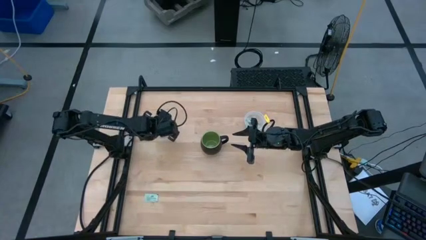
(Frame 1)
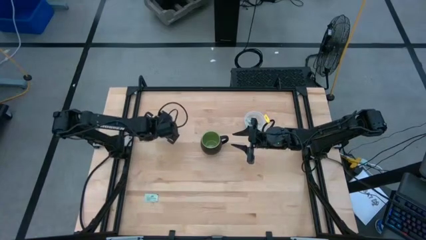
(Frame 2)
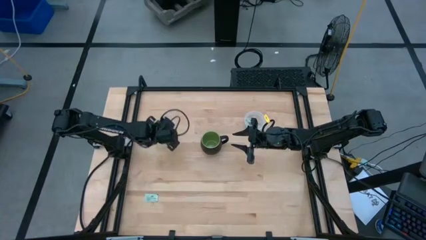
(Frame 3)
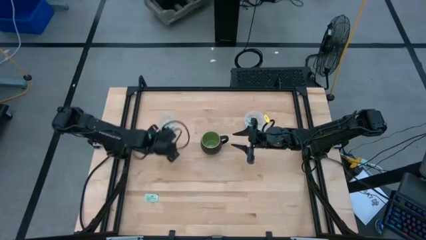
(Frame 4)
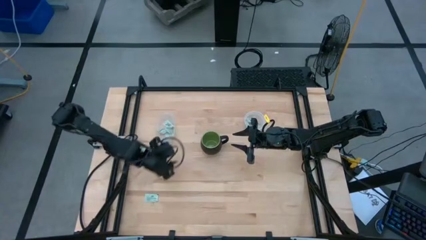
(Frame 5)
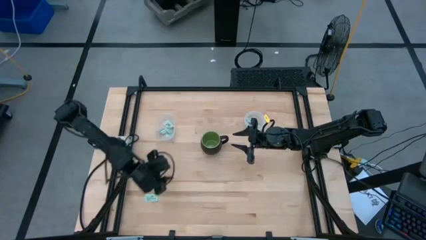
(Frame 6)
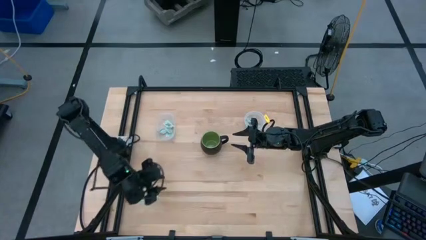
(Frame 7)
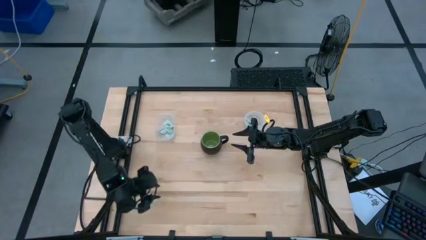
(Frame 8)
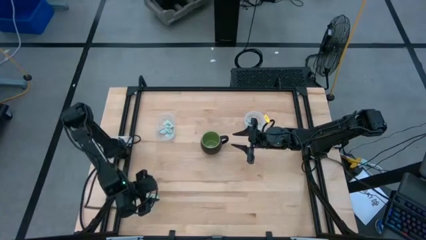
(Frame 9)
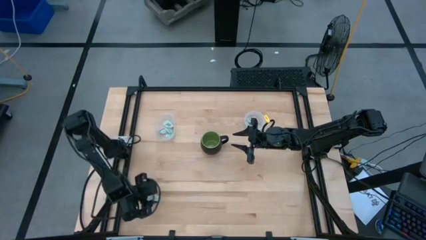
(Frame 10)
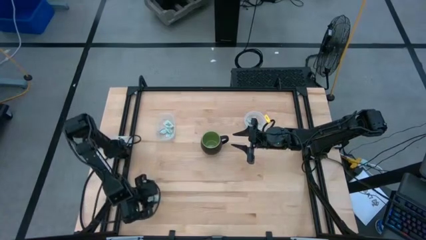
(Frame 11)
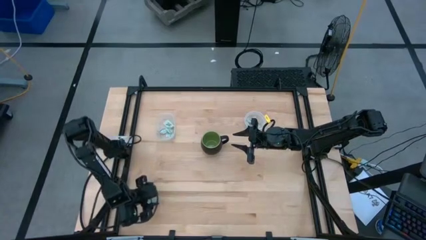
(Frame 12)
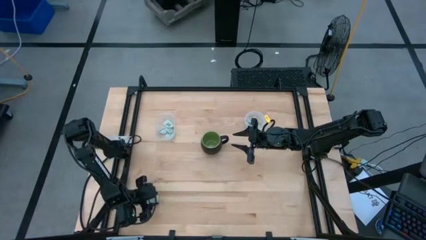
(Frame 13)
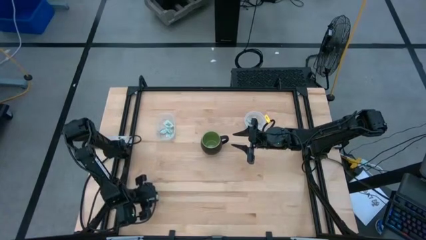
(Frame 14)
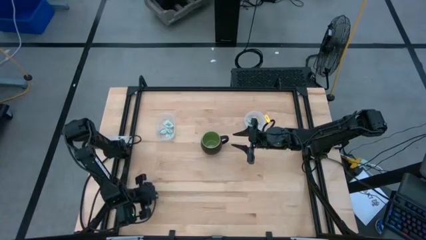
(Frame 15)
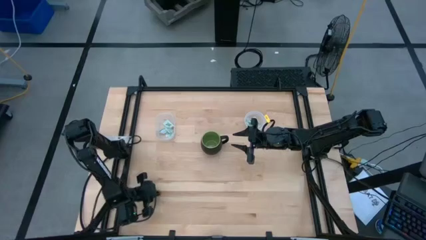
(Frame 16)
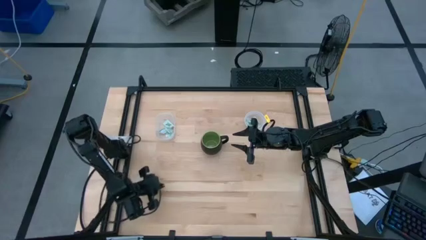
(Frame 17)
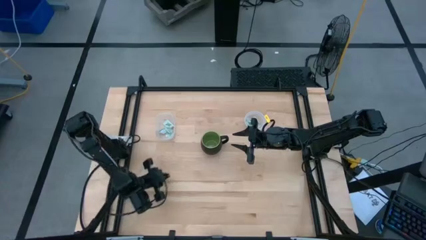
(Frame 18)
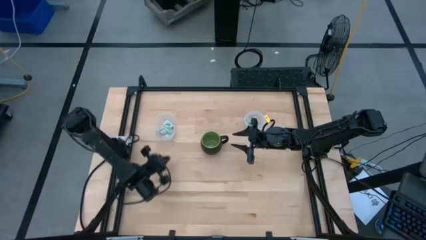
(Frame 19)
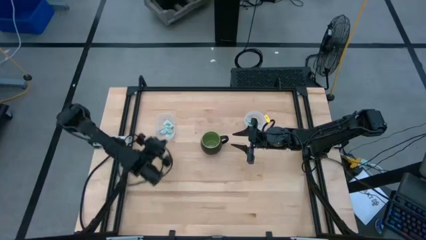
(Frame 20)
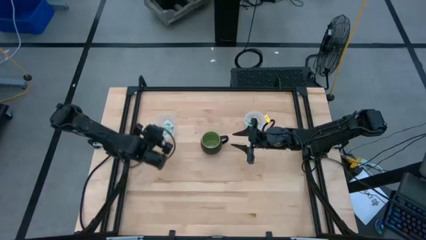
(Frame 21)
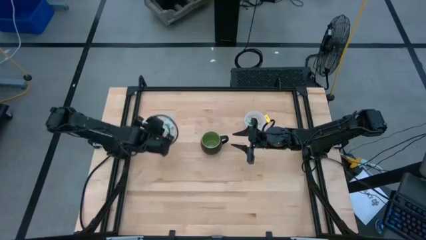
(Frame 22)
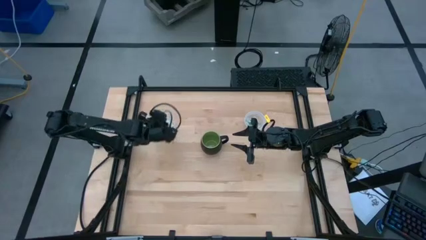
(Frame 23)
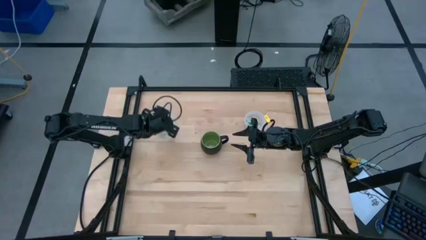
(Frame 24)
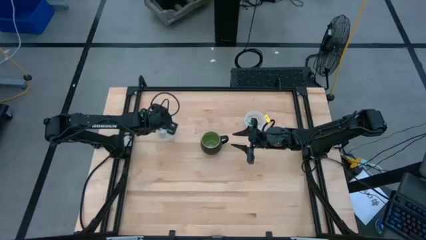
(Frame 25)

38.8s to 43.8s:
Task: Pick and place items into bin
Put the green stevia packet into the left transparent bin

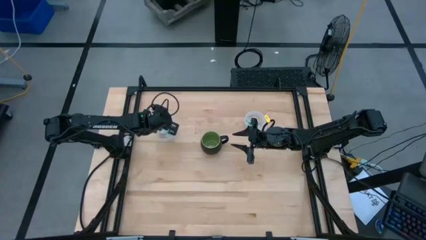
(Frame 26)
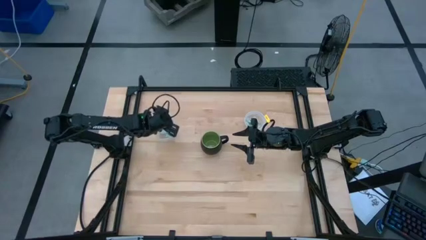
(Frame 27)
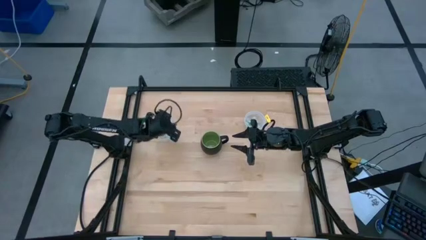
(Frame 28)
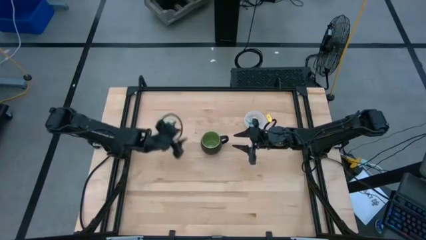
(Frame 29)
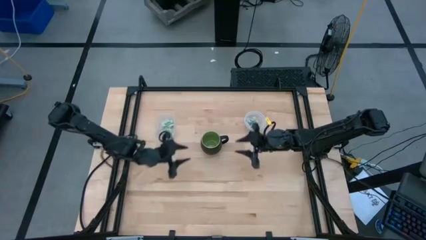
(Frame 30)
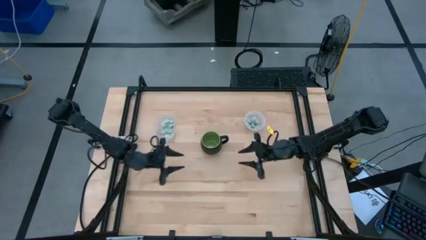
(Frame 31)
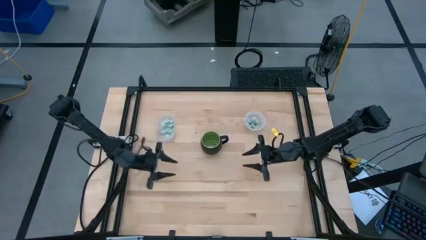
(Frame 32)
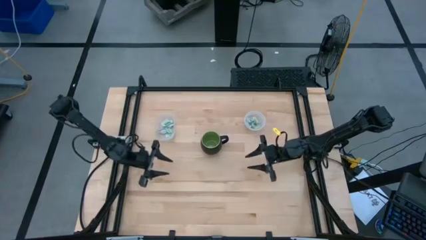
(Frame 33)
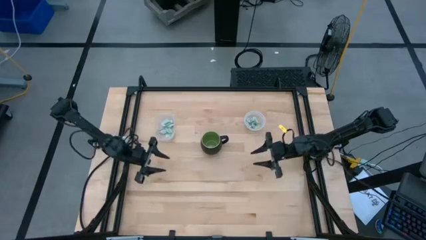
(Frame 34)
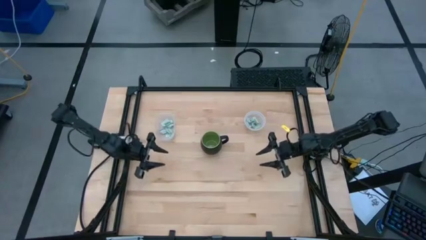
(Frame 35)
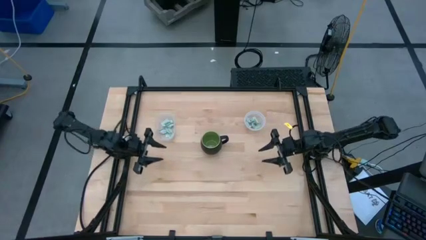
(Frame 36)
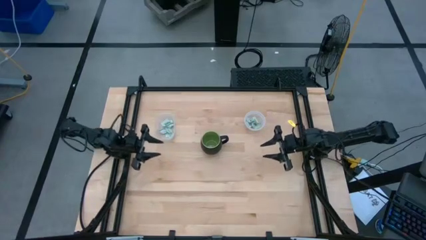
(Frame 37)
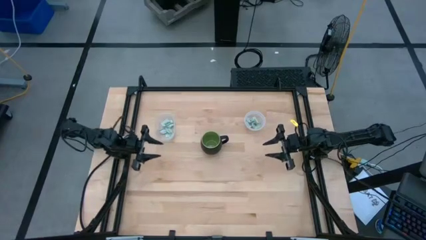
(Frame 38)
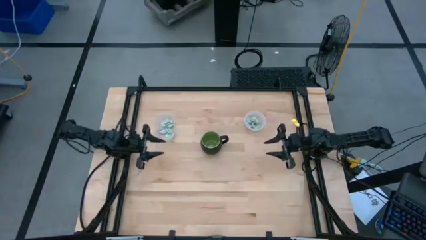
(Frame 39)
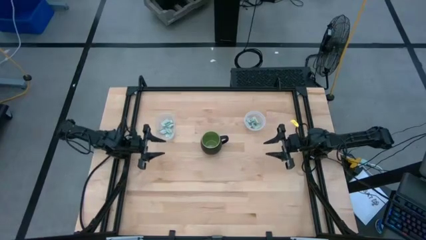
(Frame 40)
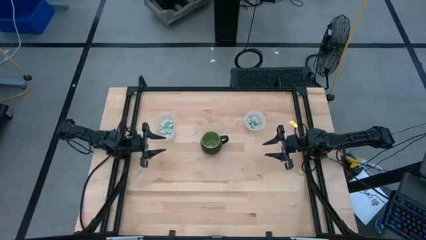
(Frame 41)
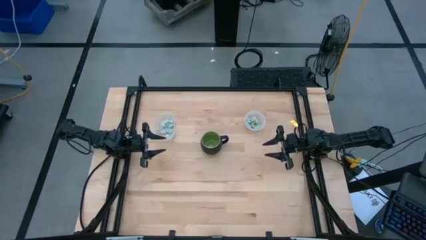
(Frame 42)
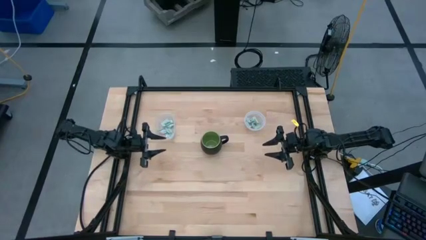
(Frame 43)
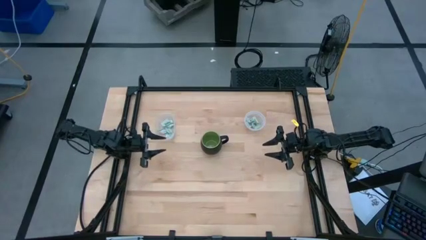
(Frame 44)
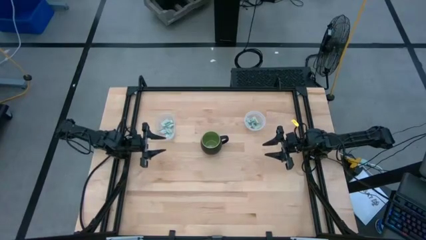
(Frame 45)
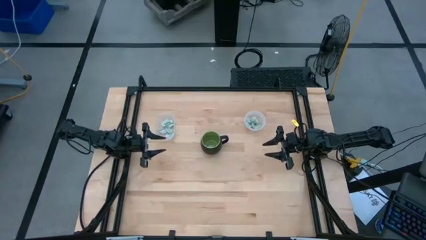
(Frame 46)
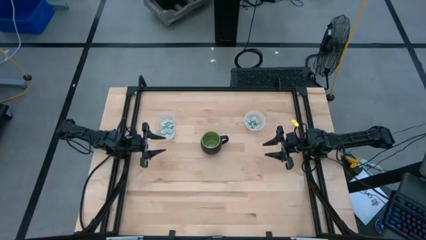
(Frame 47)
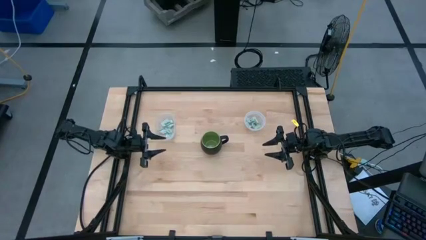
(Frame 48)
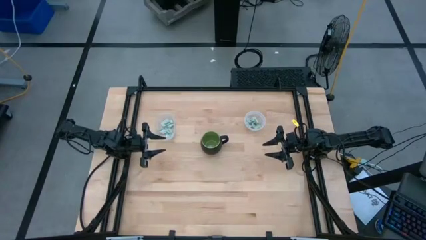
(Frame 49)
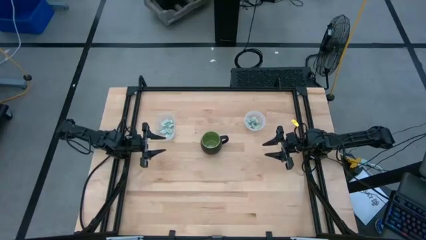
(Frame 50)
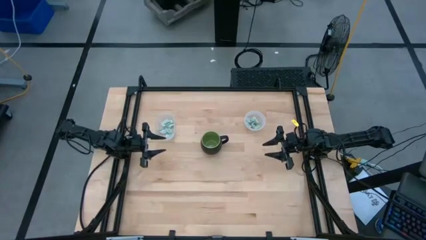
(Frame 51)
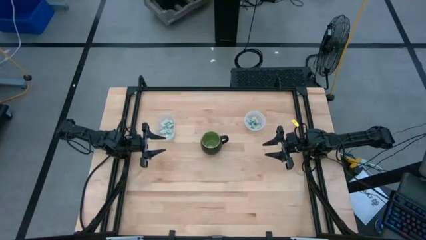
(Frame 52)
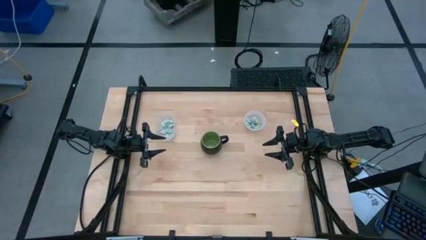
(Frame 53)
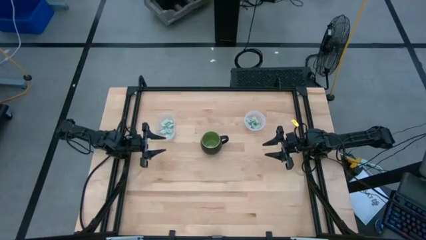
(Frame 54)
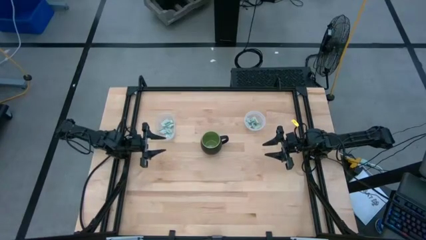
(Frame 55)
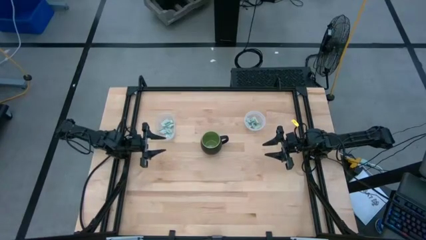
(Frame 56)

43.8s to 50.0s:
Return to Home Position

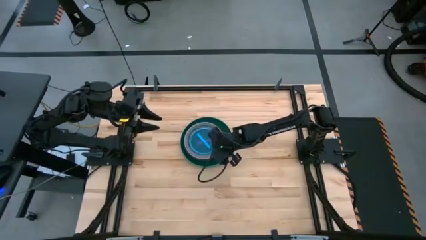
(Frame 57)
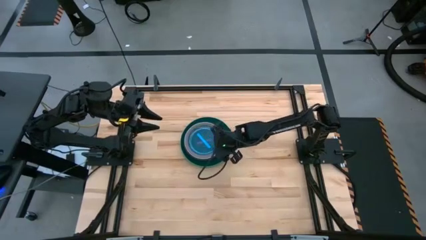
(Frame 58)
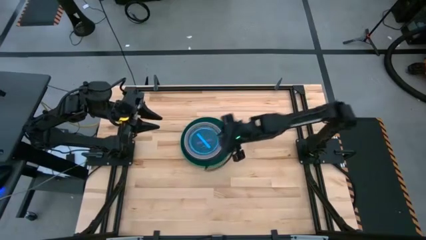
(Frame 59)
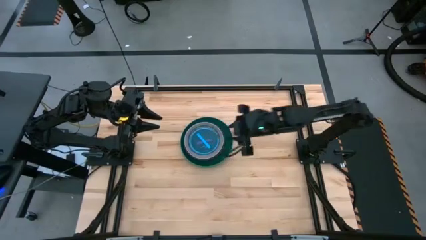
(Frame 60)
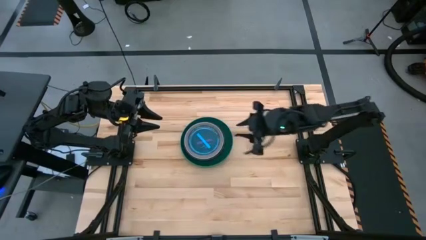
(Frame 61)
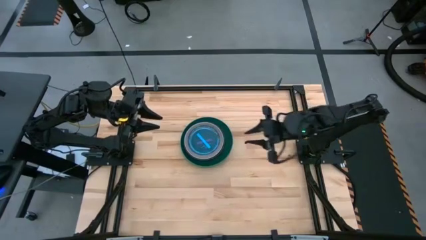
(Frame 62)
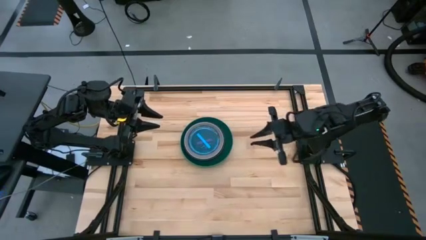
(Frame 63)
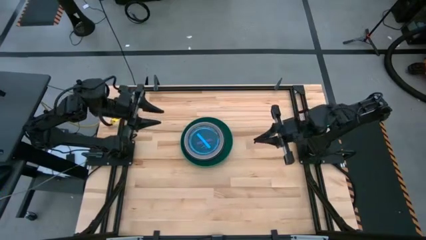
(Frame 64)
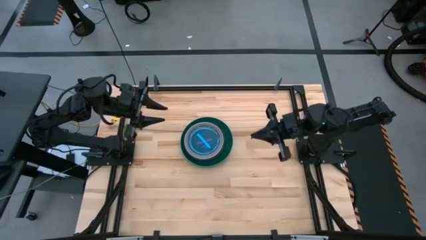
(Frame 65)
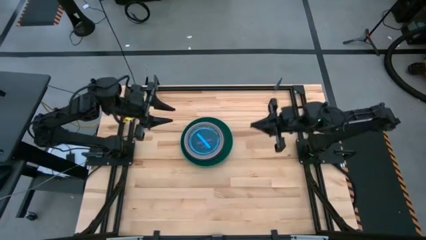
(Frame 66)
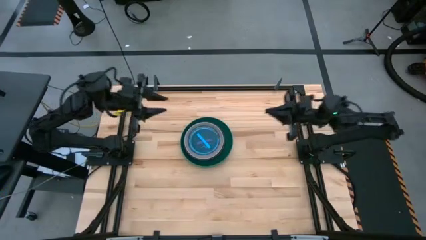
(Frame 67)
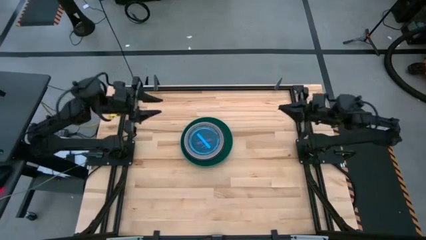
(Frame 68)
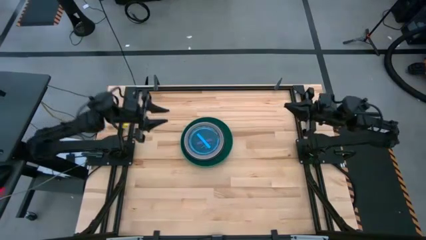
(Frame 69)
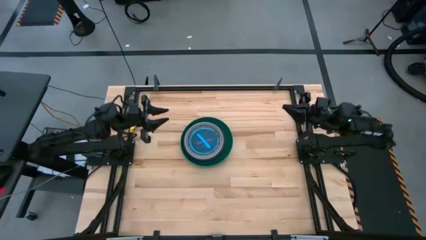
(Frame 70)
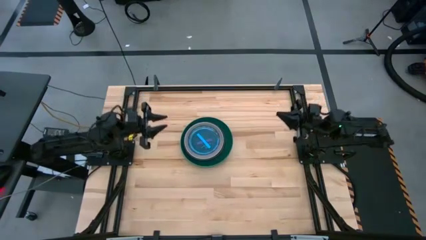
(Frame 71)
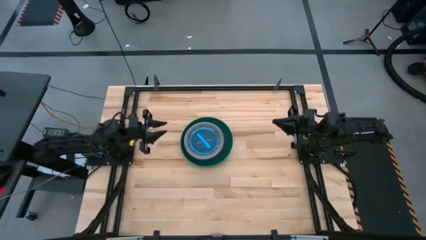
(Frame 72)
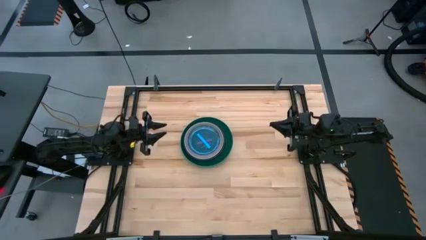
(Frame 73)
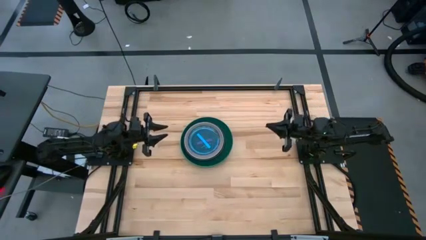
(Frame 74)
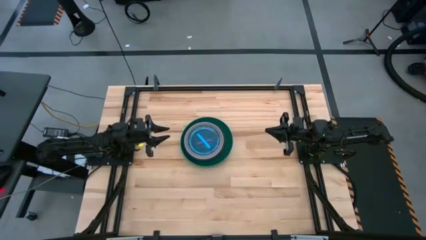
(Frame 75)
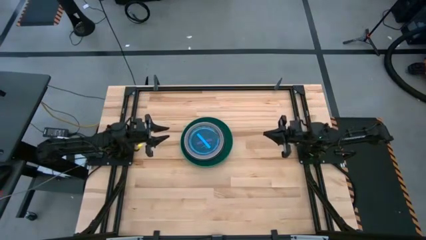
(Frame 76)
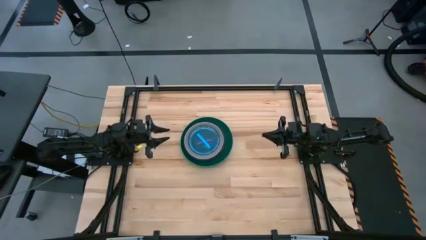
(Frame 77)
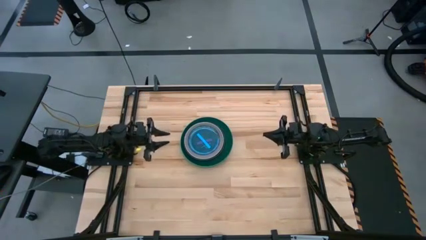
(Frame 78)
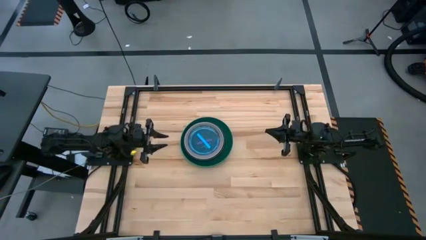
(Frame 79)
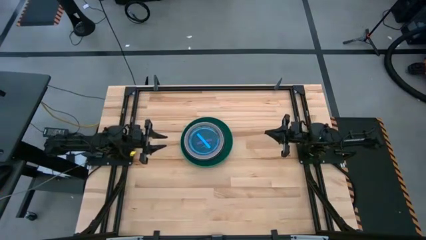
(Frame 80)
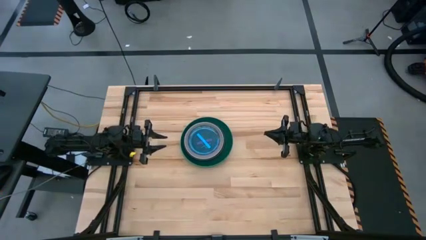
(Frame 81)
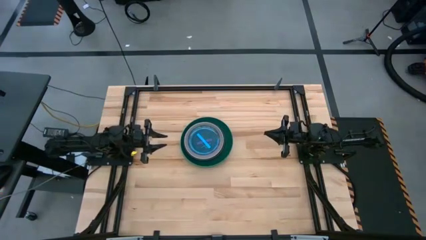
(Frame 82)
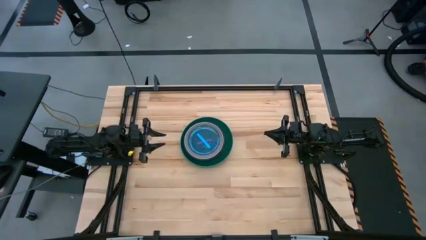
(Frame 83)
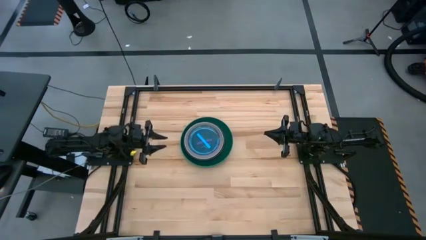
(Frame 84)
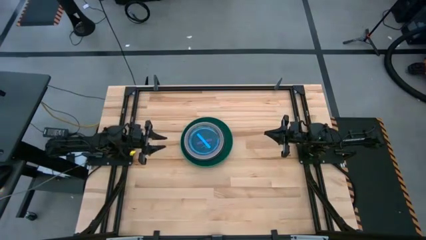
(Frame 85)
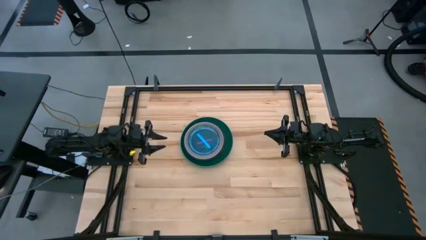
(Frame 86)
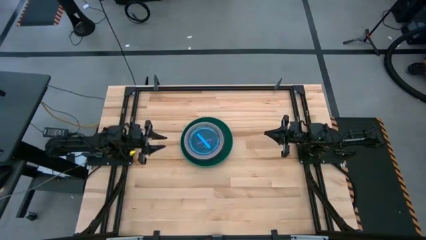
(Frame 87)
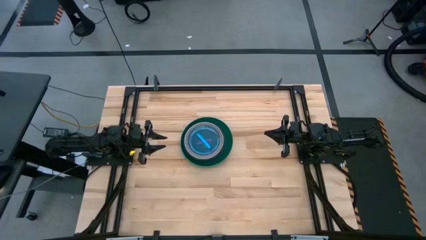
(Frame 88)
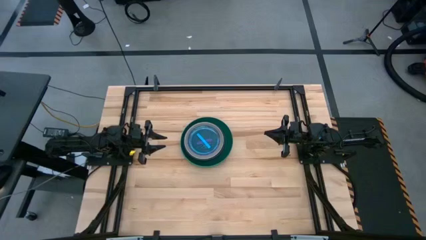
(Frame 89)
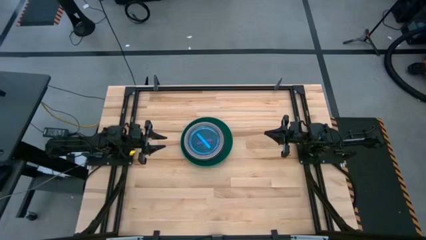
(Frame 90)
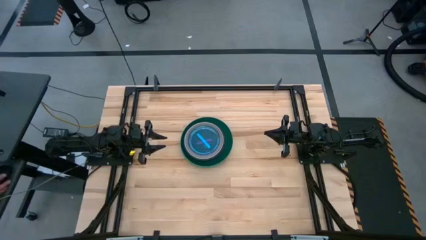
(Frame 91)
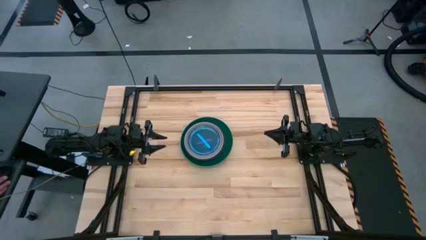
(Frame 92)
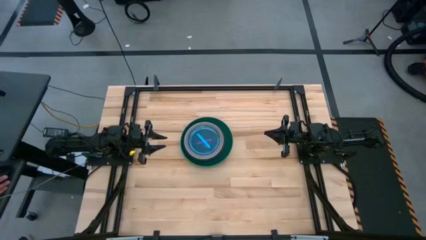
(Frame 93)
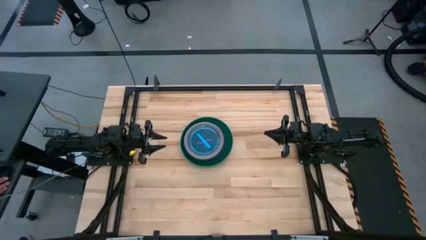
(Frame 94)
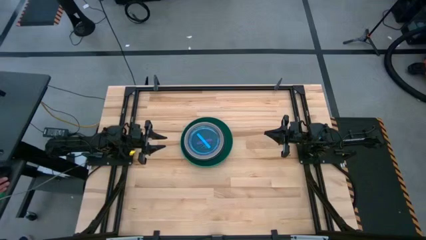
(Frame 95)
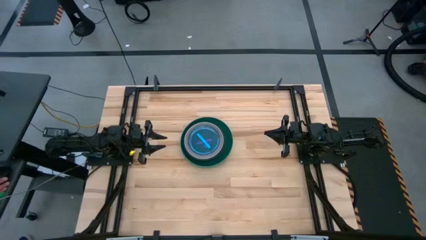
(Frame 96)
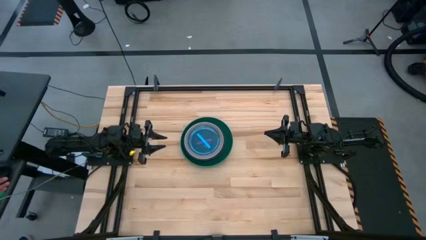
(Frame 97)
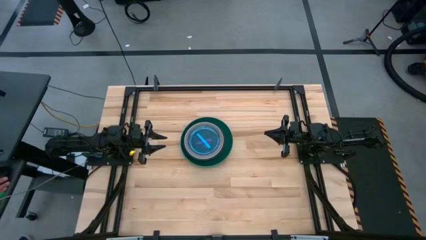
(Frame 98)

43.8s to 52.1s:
Task: Stack plastic plates
Return to Home Position
